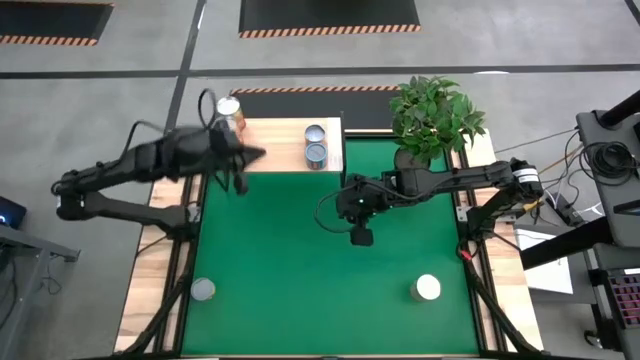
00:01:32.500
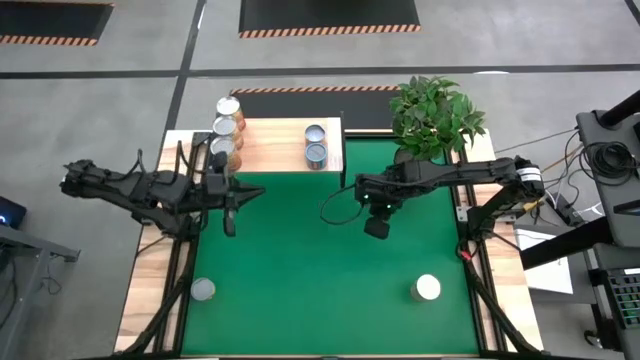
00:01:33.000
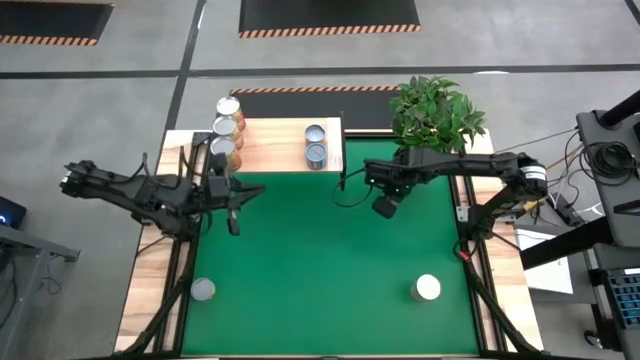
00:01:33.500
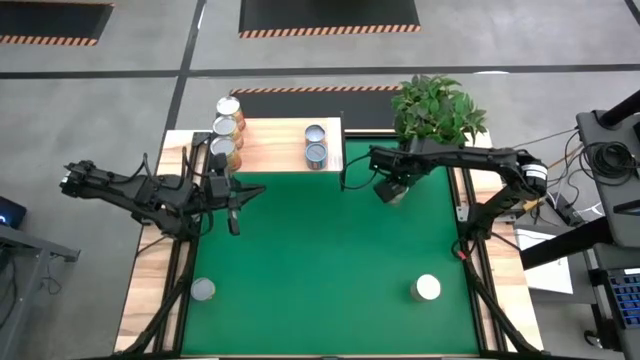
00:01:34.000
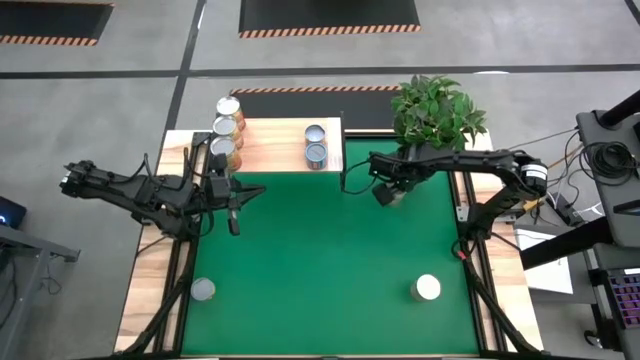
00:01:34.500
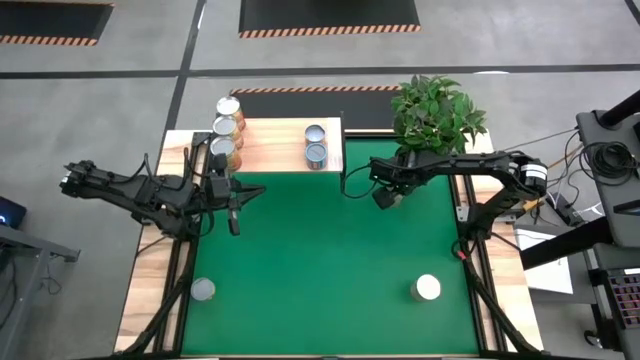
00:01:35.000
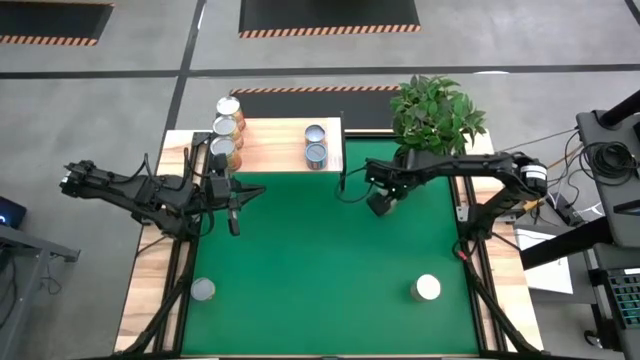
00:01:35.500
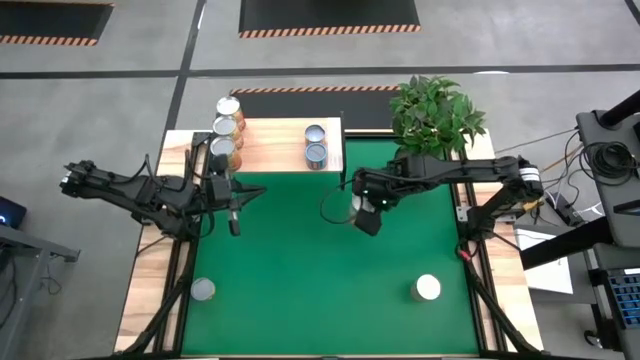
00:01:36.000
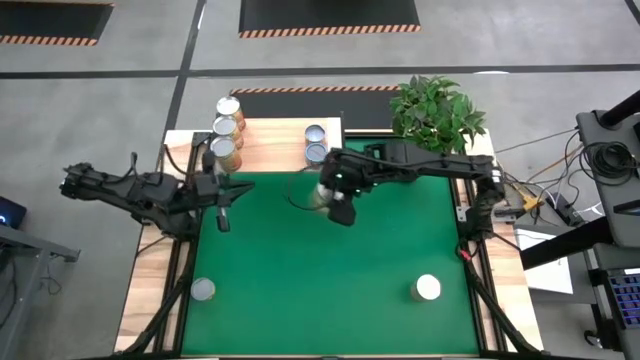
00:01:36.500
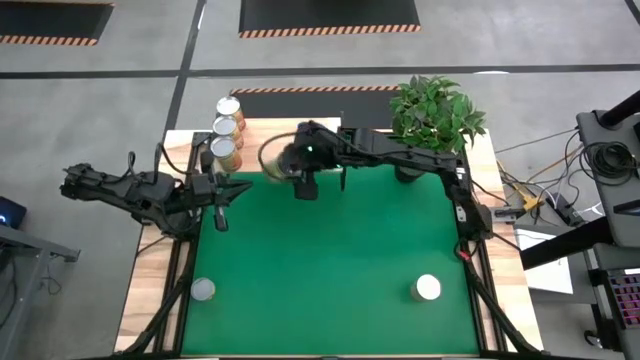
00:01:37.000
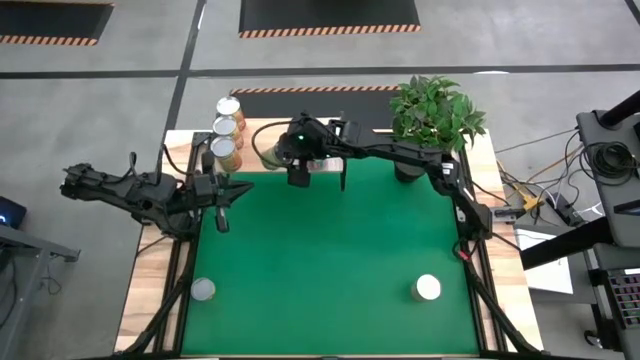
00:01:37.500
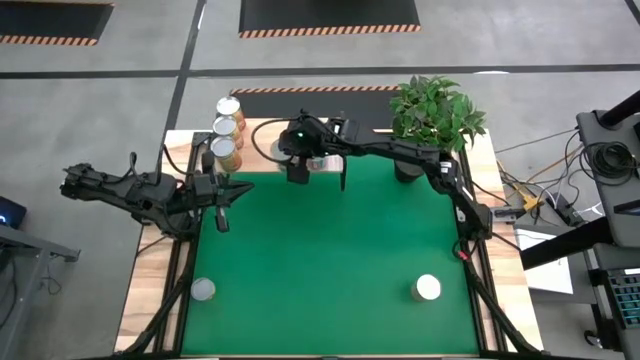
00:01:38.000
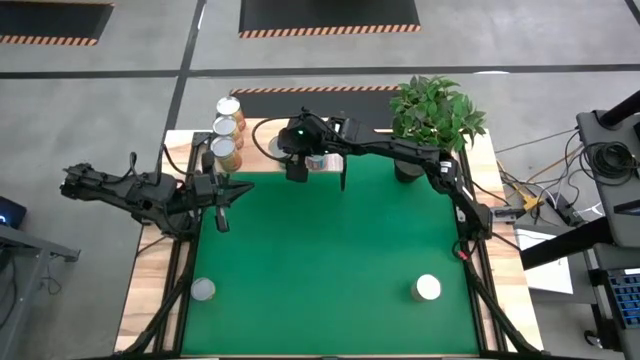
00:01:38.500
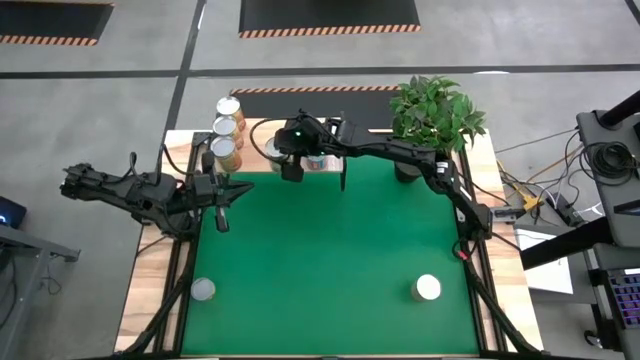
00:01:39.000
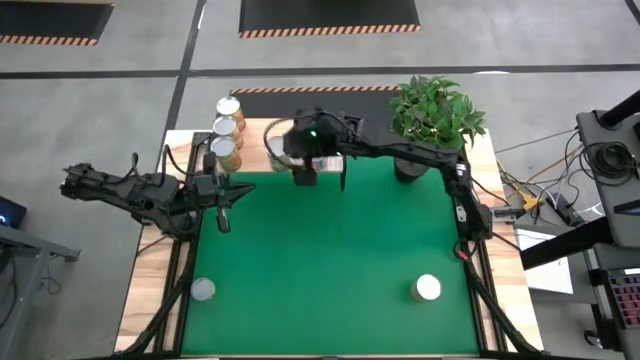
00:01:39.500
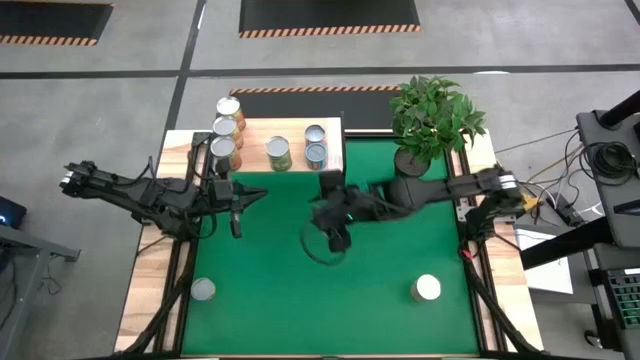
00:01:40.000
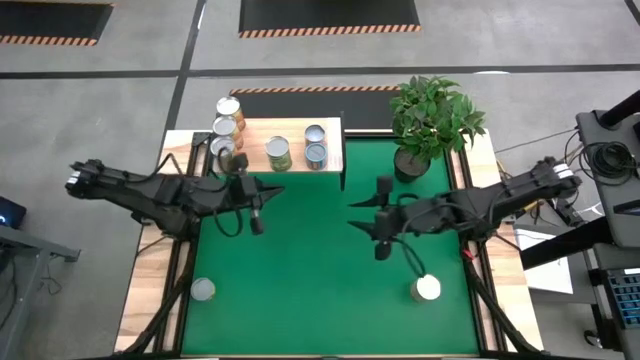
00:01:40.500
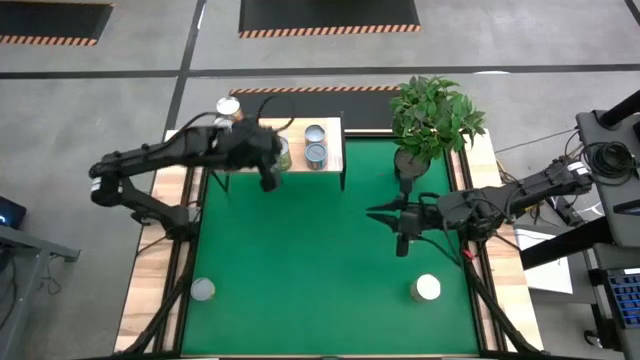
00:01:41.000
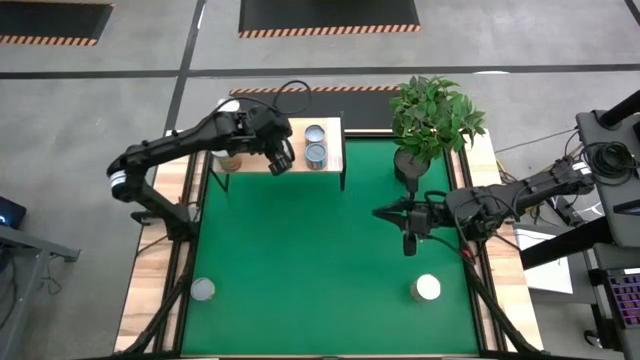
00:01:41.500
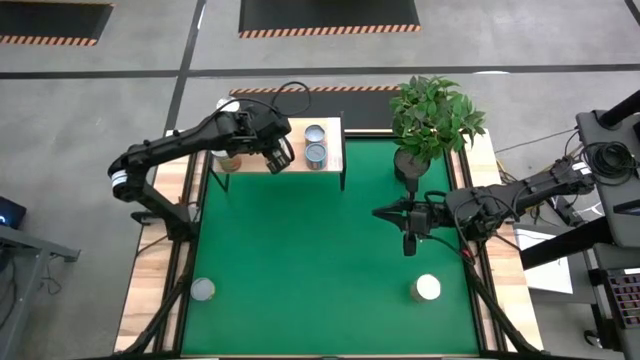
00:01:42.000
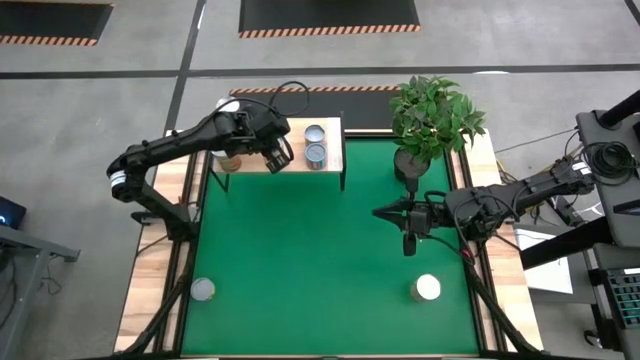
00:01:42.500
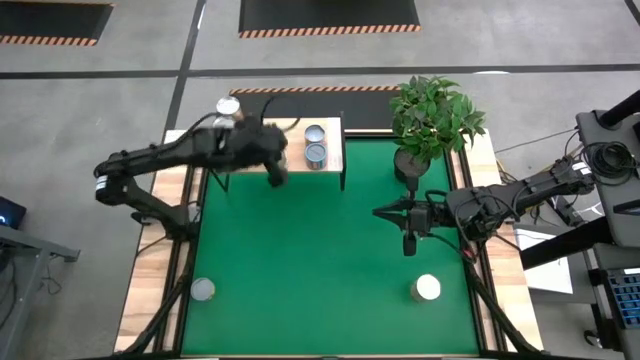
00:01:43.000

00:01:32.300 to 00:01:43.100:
Task: Pick and place cans onto a shelf
Put the top right light green can on the shelf

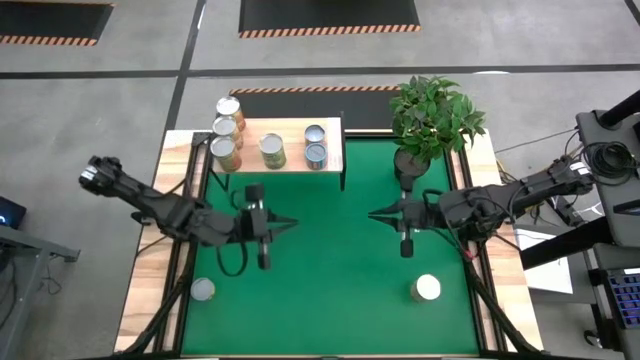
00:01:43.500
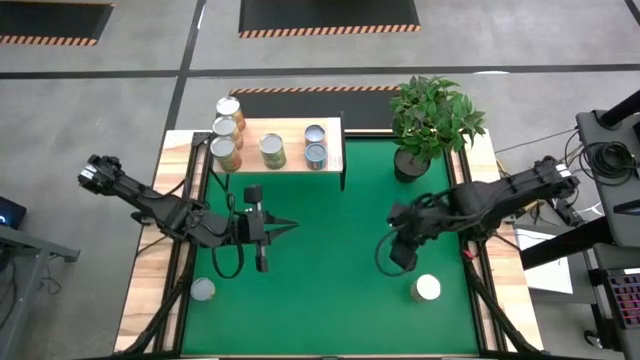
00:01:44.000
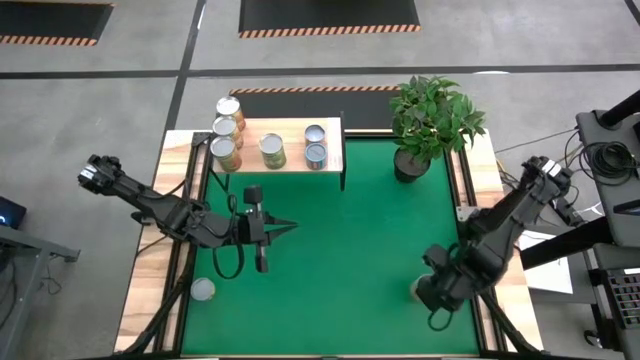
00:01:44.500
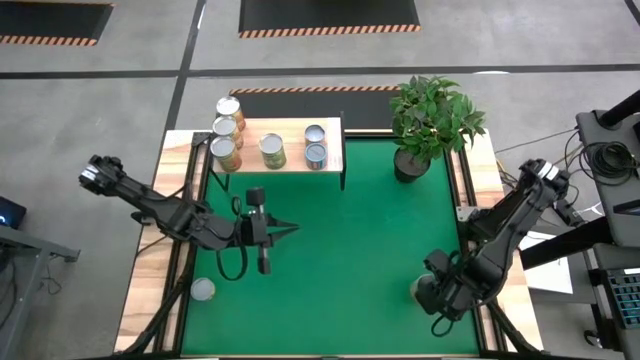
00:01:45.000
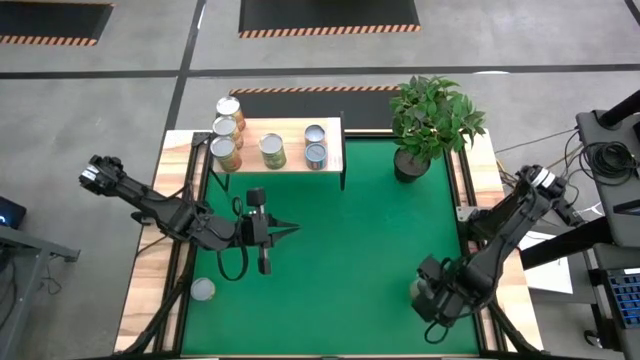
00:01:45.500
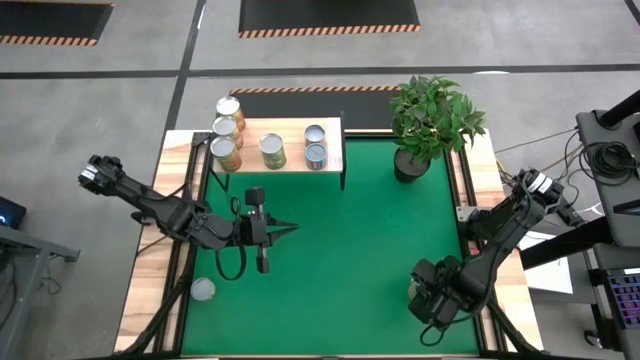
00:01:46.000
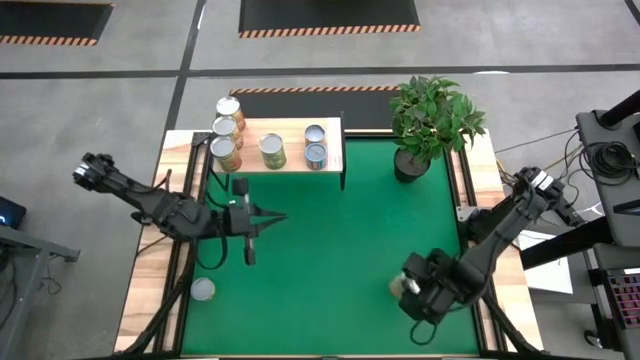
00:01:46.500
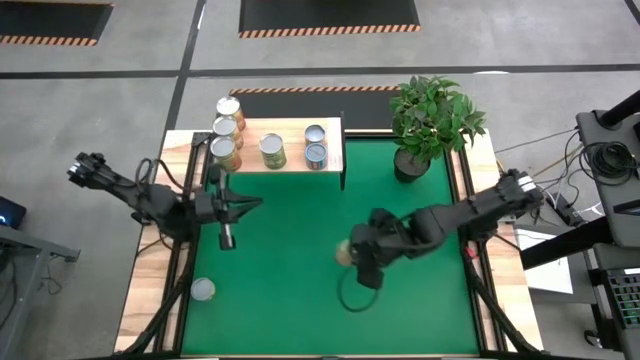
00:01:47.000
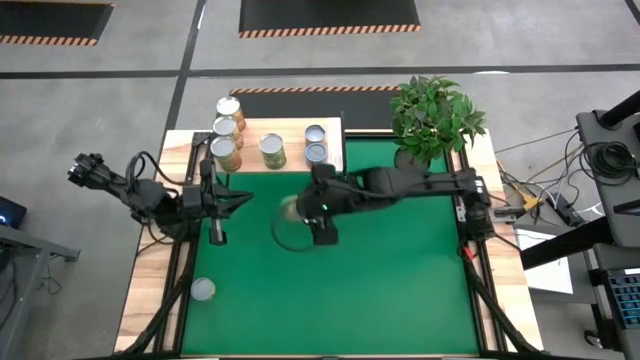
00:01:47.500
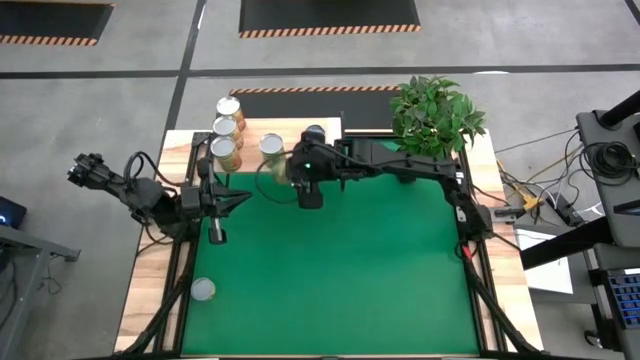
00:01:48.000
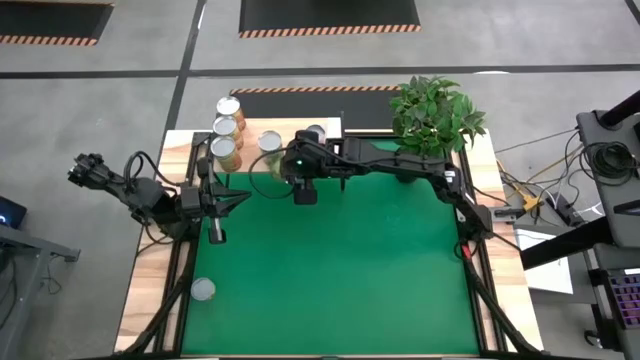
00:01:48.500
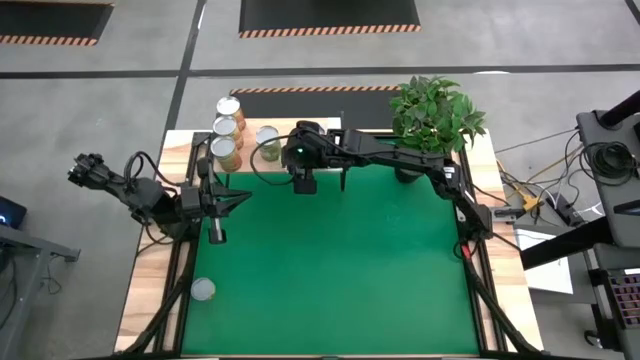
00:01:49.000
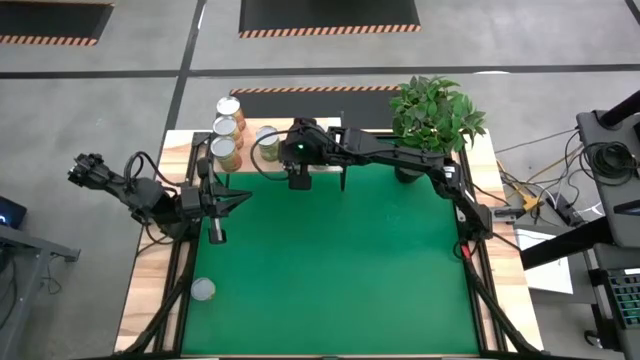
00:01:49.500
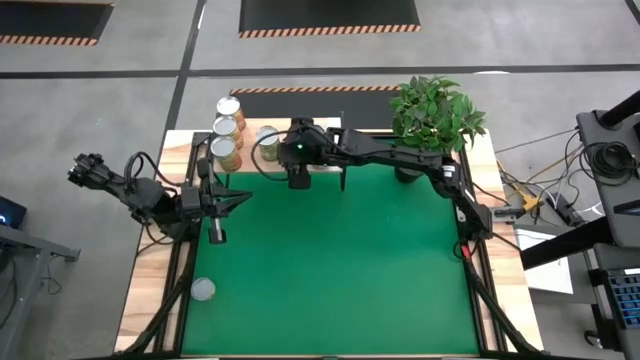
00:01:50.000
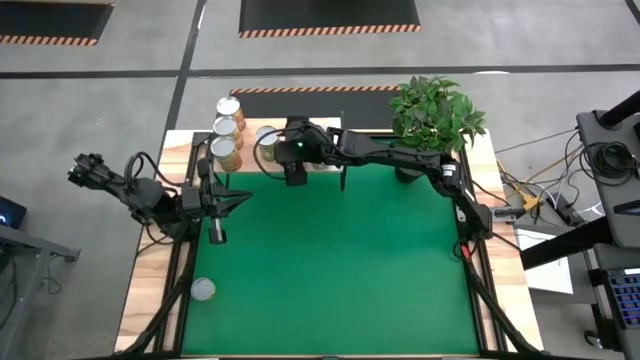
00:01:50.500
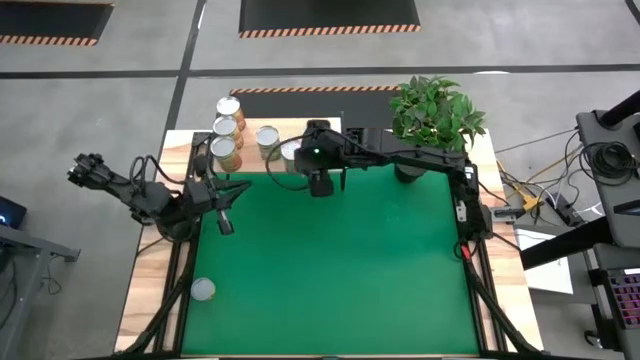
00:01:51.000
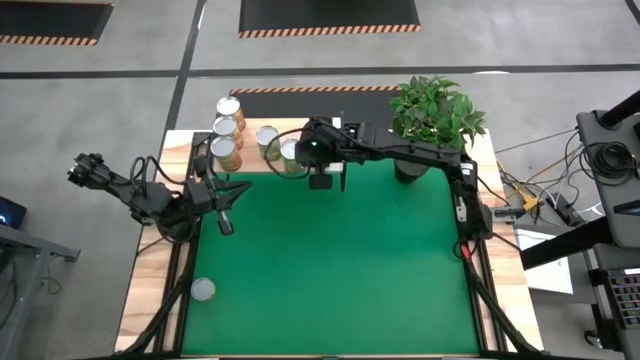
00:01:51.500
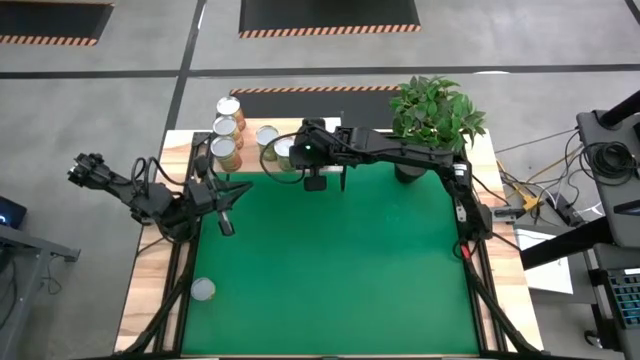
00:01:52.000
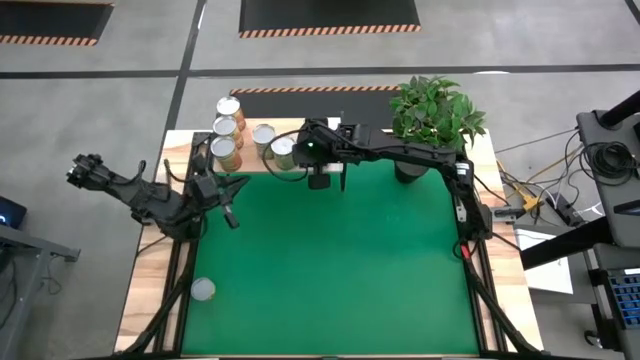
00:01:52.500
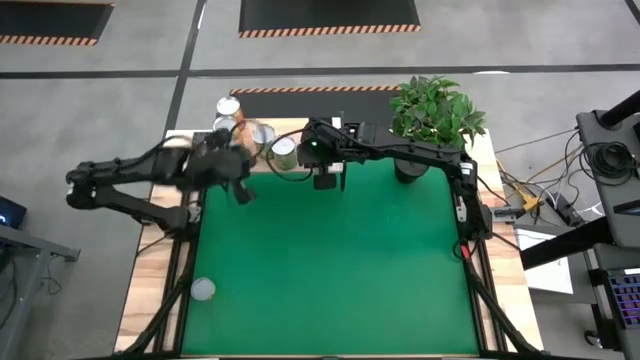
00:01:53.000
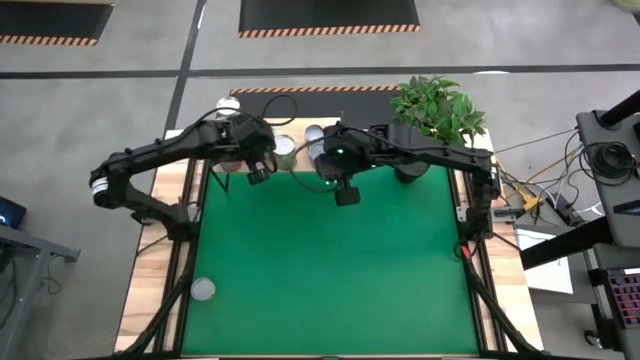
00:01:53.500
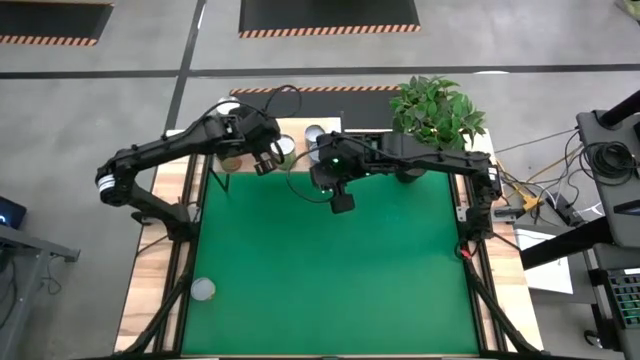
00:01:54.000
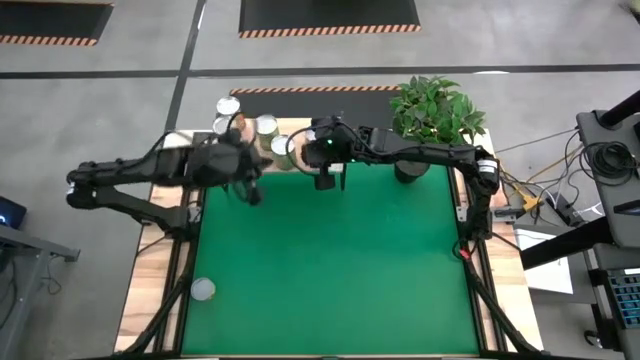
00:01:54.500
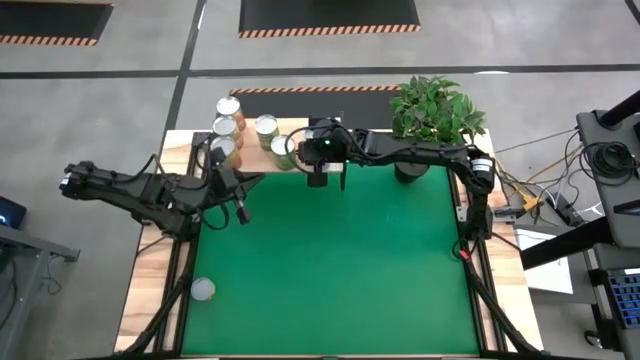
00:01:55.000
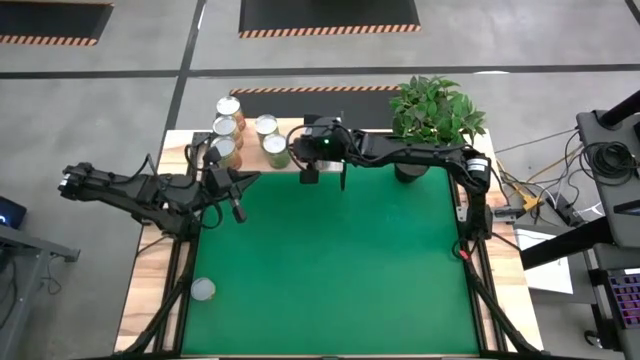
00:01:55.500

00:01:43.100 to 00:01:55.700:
Put the light green can on the shelf aligned with the light green can
